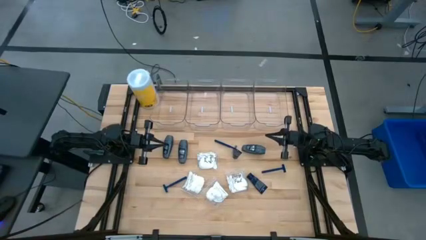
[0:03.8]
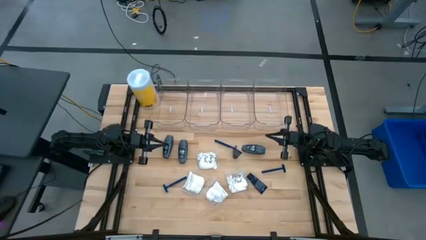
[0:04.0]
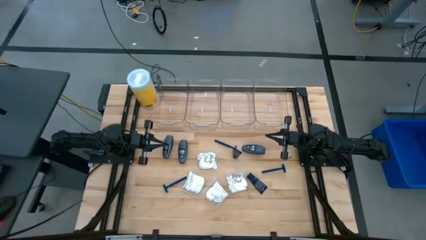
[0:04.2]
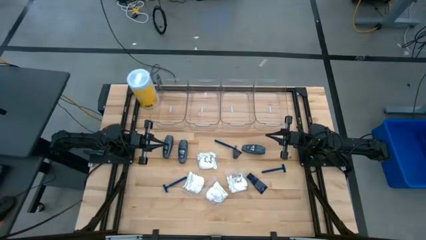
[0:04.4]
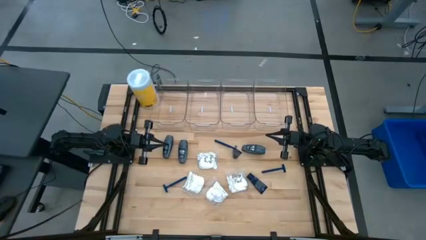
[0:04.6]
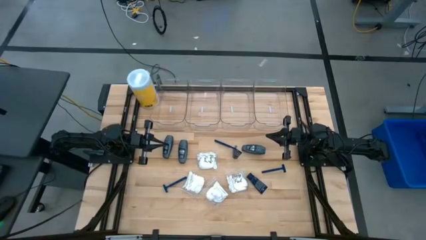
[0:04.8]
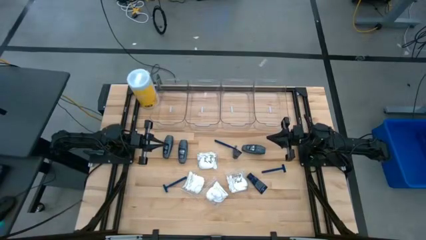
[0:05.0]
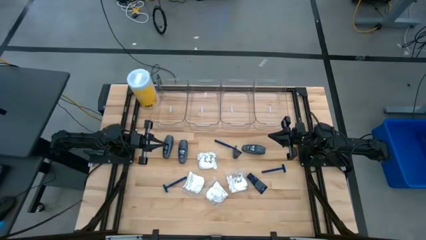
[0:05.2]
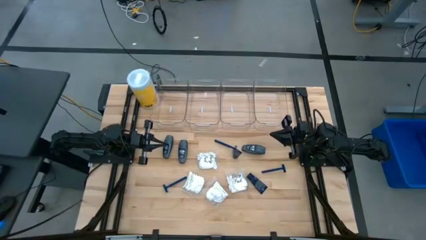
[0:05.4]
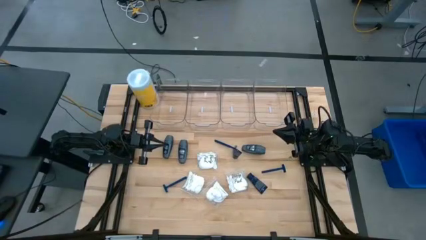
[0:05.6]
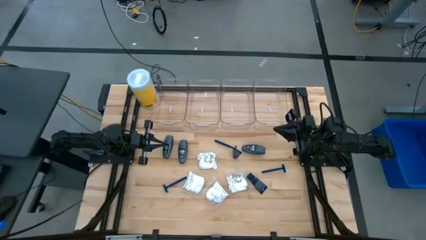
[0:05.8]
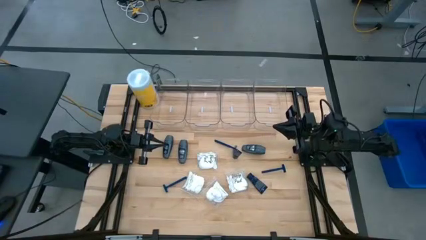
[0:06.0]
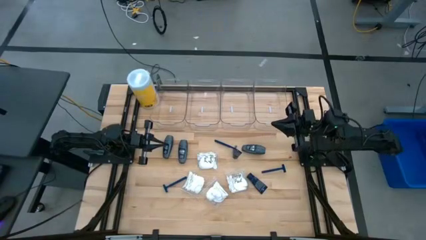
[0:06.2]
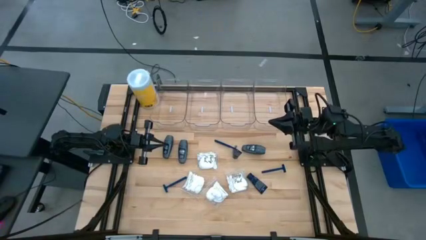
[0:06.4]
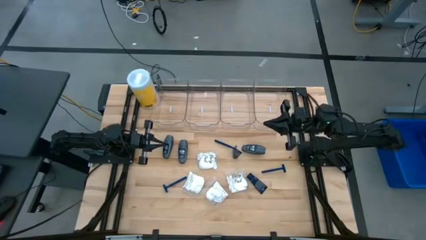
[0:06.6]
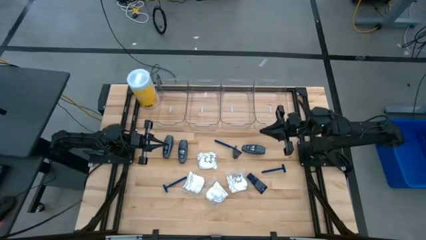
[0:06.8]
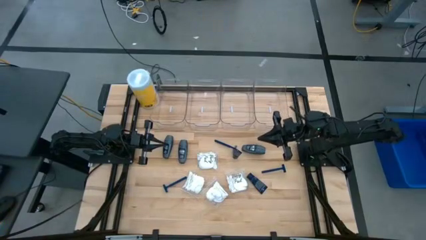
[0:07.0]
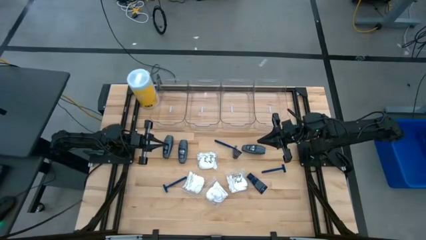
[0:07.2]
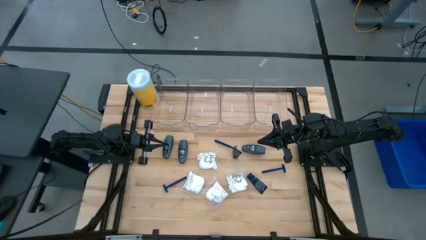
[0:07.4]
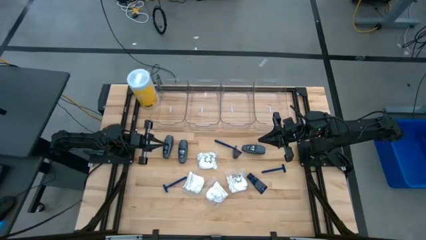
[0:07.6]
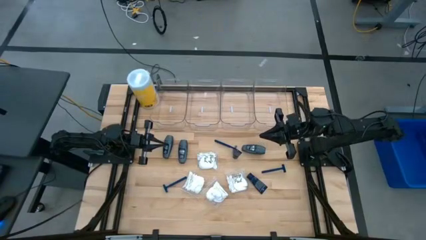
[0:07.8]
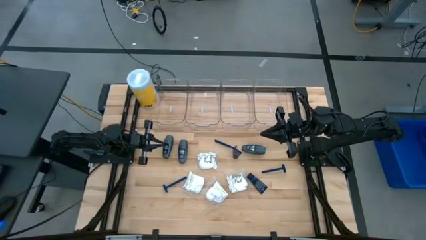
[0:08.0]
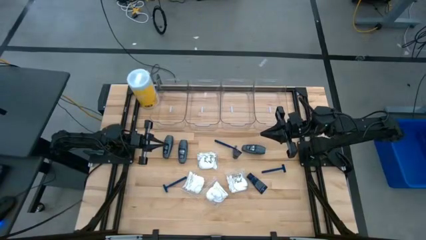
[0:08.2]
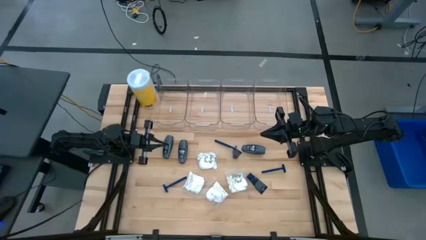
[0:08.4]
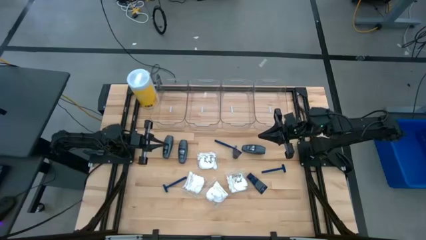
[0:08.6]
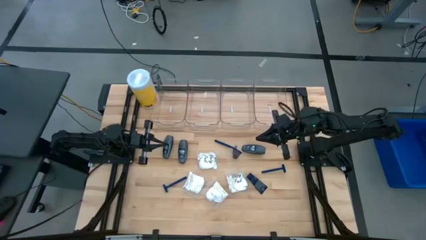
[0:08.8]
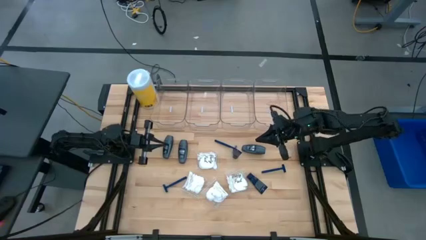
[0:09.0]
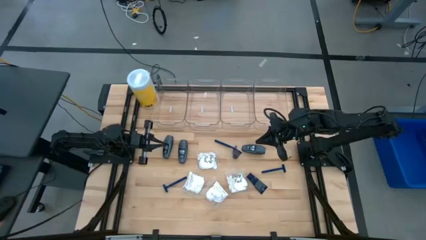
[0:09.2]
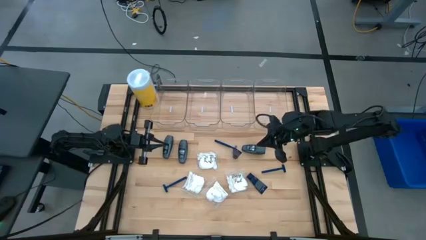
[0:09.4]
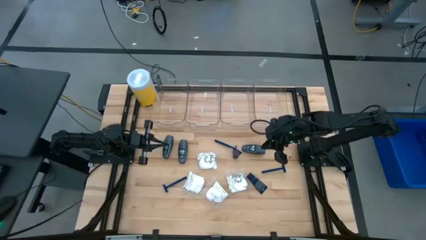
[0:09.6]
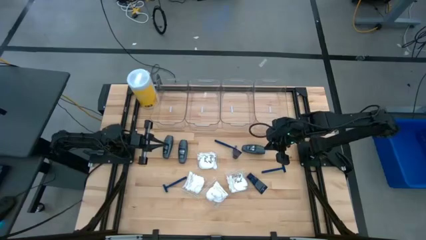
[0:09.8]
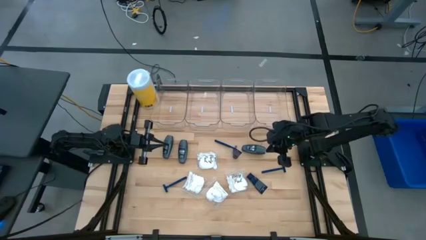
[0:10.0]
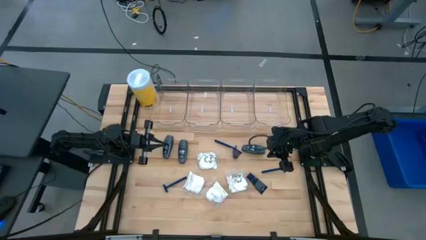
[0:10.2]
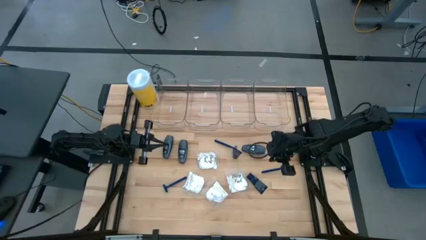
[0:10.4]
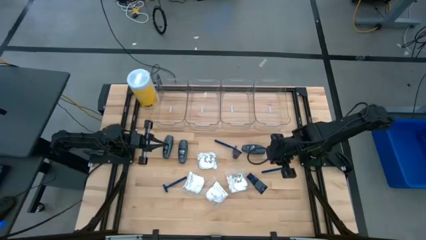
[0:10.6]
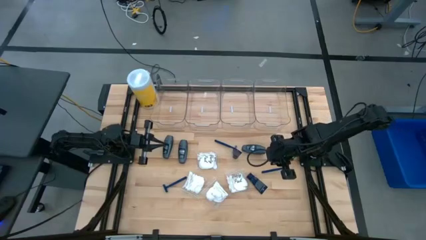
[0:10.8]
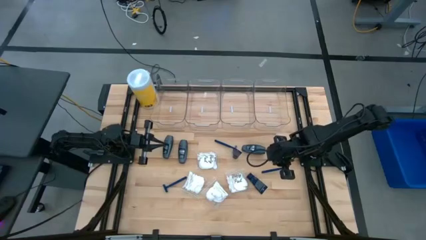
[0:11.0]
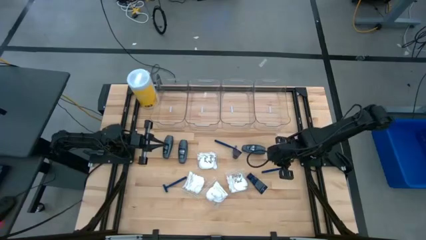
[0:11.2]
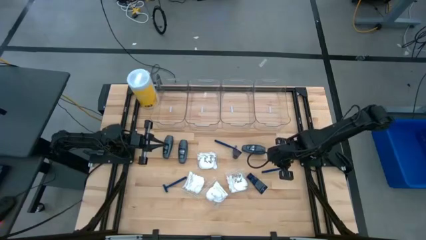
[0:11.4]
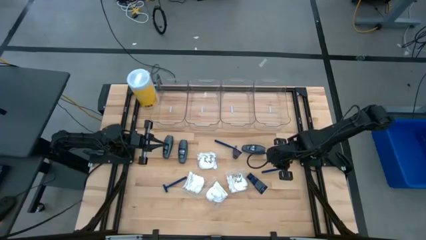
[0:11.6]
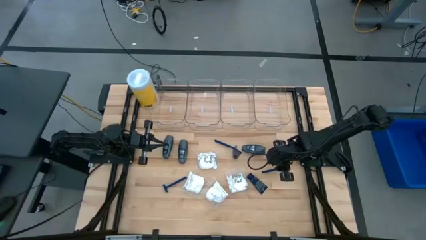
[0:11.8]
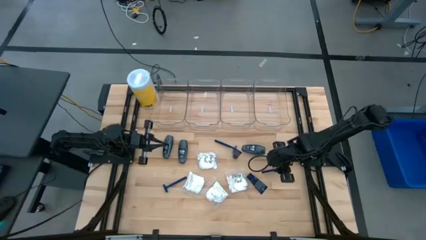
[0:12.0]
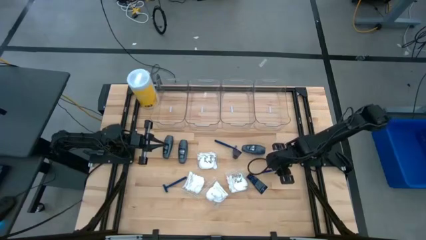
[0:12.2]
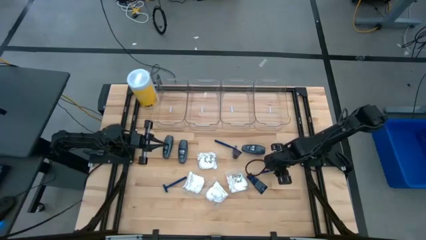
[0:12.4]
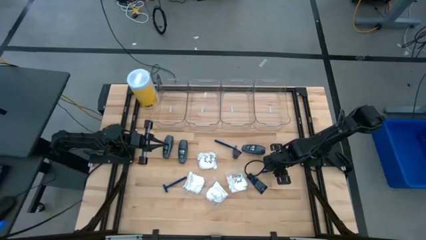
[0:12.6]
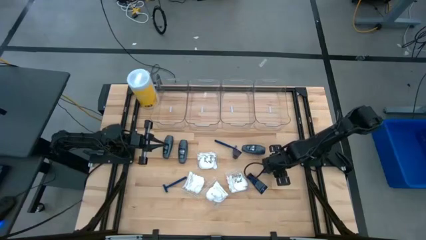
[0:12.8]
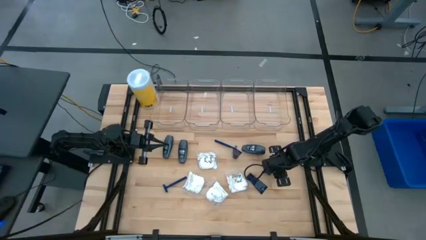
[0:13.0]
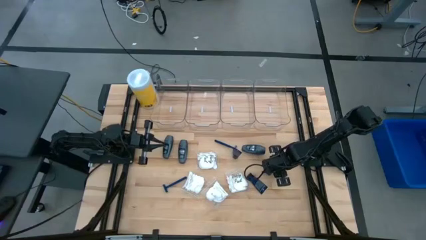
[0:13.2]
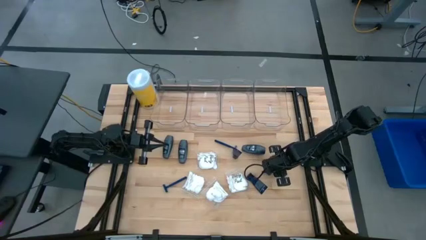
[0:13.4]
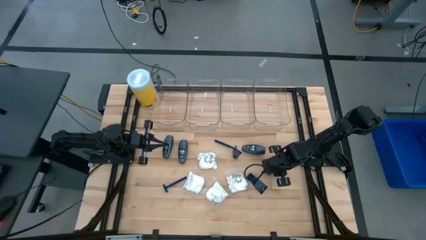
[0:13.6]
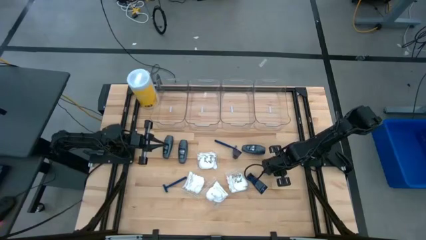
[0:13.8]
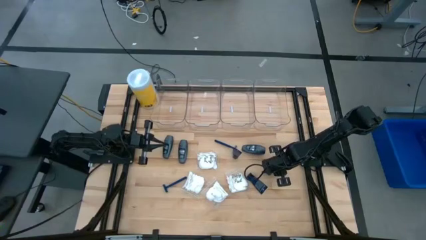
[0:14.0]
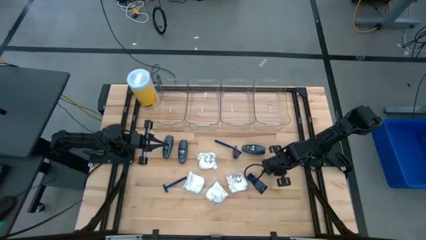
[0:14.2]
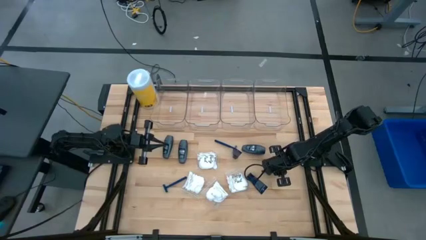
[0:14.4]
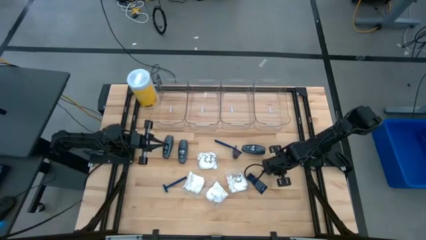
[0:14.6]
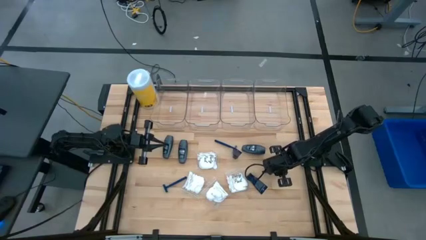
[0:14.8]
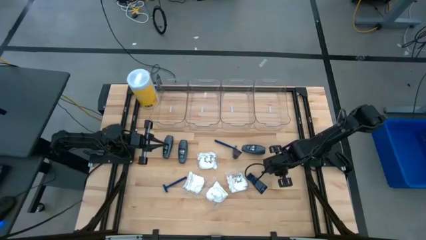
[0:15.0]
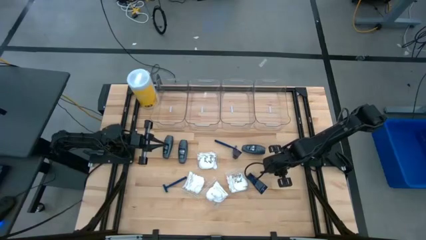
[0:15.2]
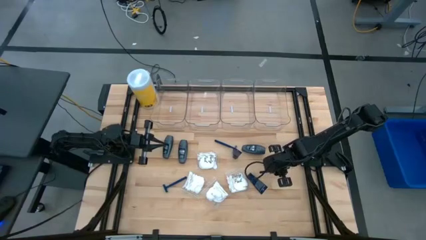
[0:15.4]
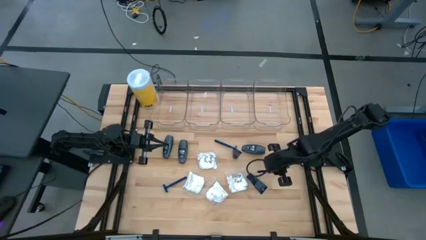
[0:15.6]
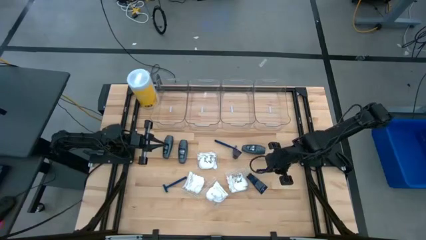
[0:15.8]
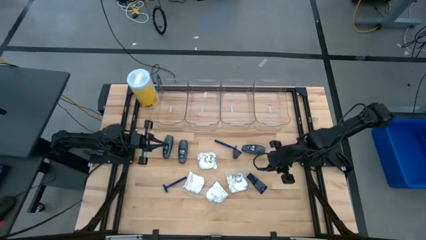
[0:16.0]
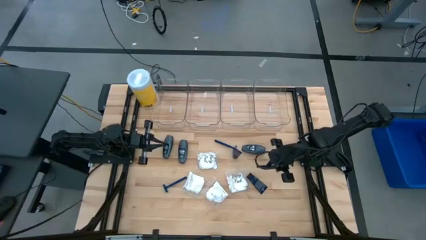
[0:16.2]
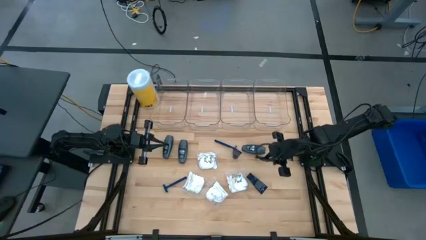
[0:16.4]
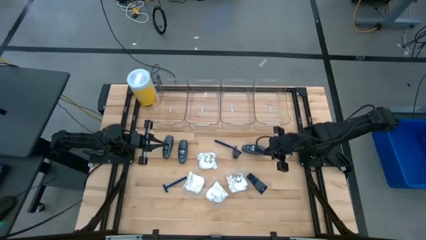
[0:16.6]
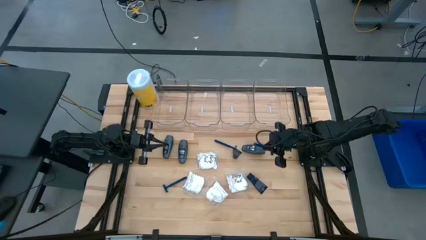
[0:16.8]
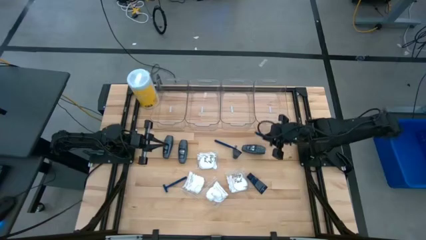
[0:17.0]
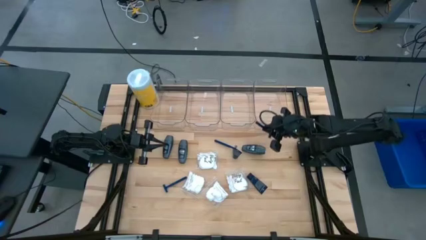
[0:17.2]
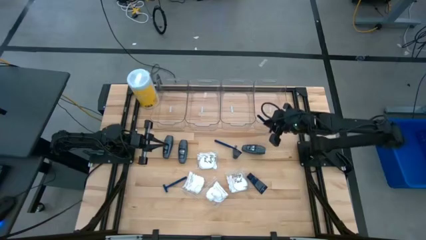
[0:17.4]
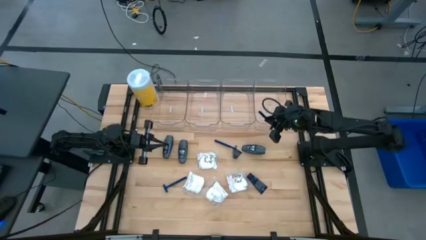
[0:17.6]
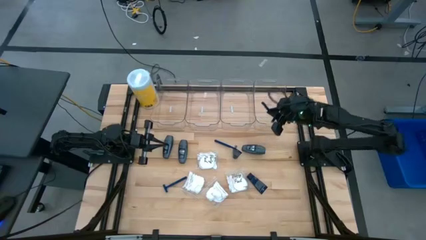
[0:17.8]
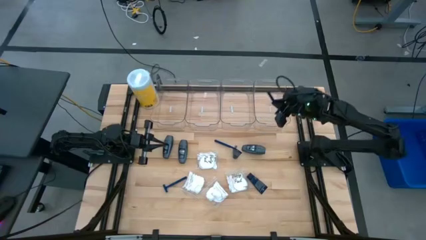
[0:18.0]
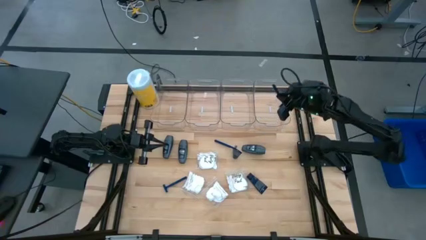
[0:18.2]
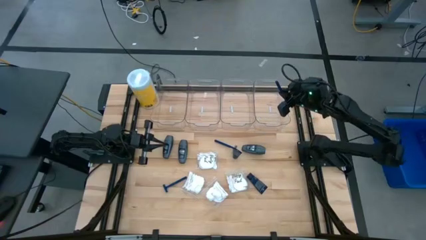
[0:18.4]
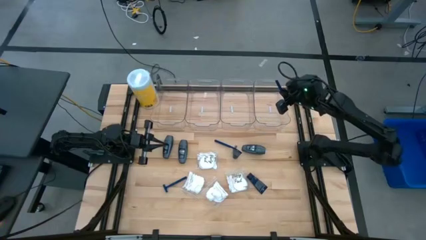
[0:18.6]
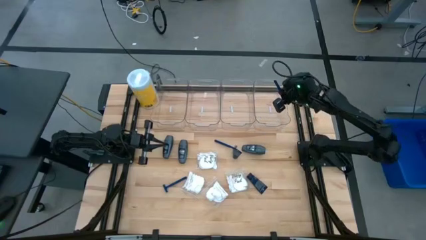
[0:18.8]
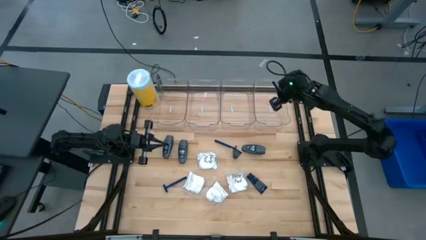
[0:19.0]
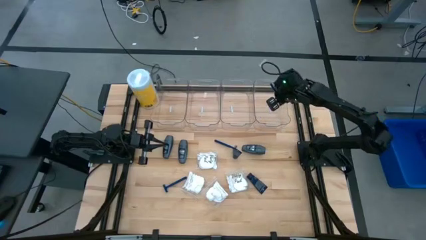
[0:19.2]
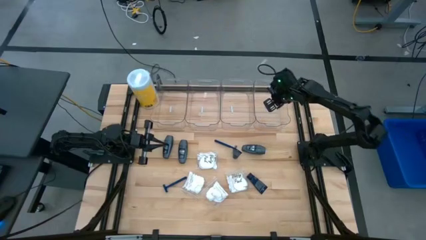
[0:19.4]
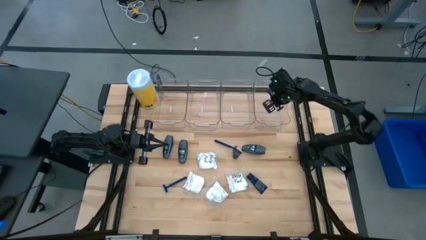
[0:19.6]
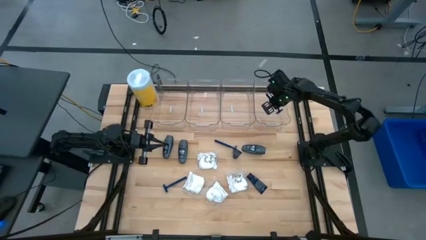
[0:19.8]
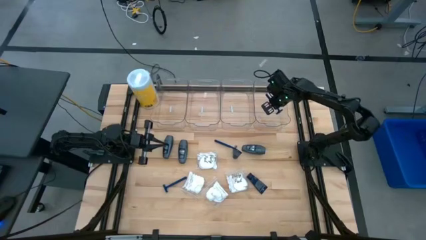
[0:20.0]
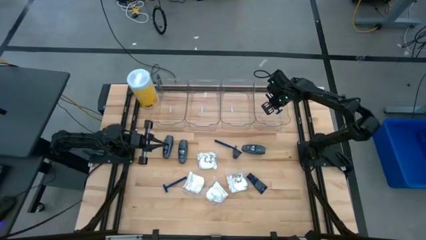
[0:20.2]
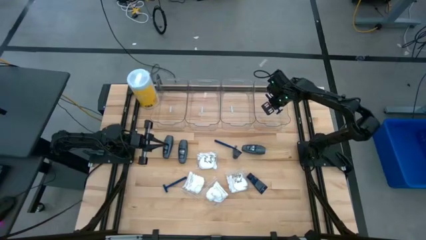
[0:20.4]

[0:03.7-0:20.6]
Task: Pick & Place Travel size toiletries
Put the blue razor into the right transparent bin
